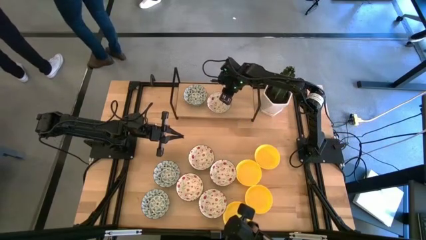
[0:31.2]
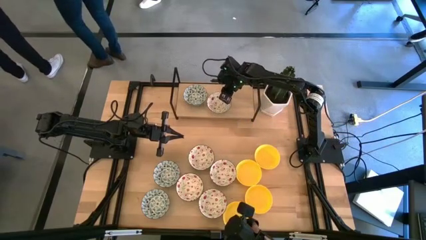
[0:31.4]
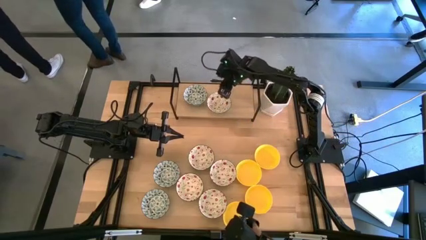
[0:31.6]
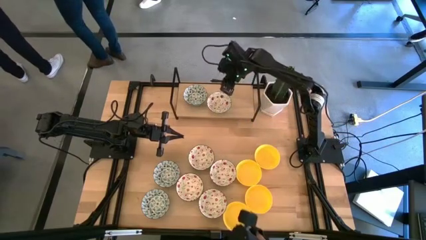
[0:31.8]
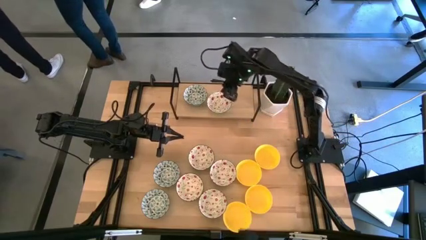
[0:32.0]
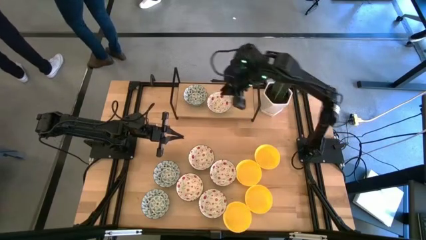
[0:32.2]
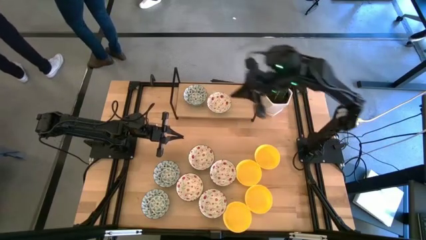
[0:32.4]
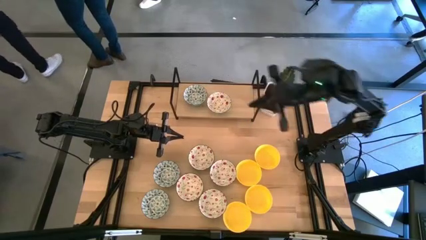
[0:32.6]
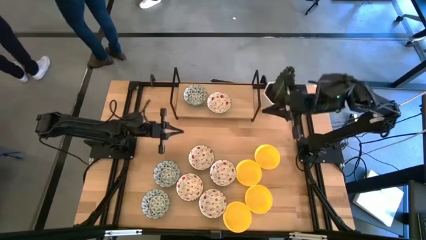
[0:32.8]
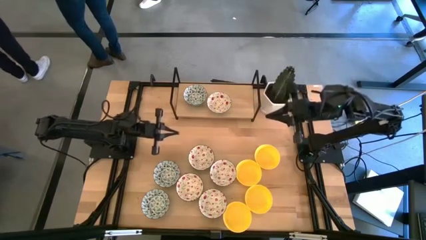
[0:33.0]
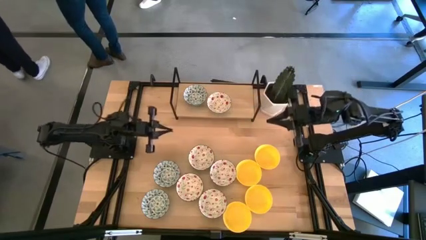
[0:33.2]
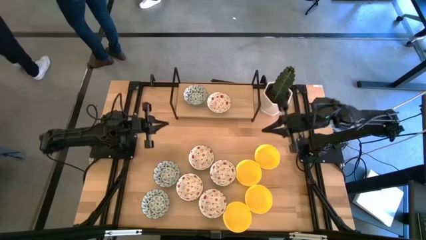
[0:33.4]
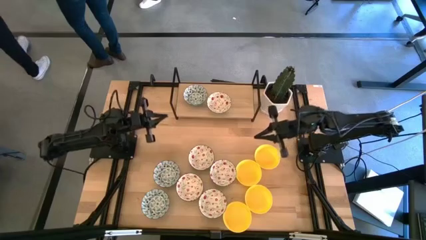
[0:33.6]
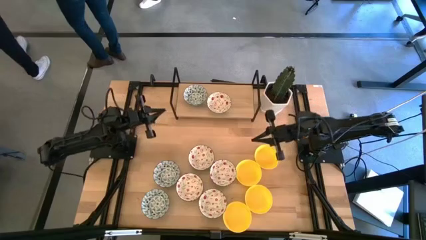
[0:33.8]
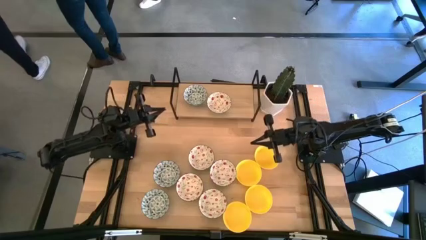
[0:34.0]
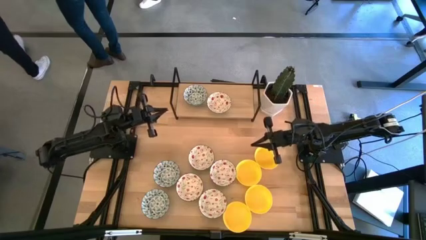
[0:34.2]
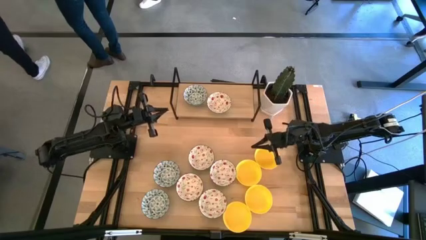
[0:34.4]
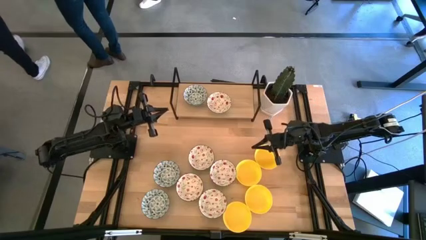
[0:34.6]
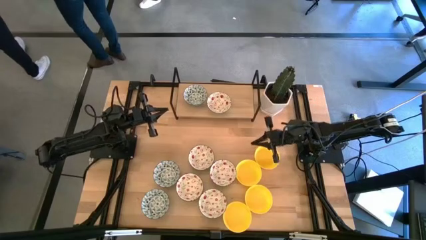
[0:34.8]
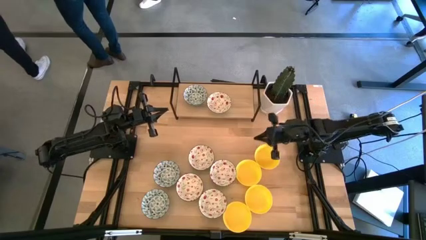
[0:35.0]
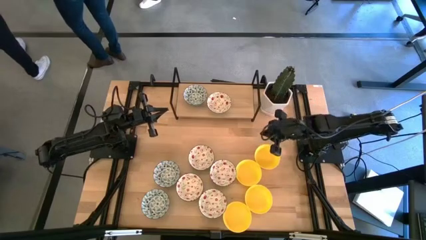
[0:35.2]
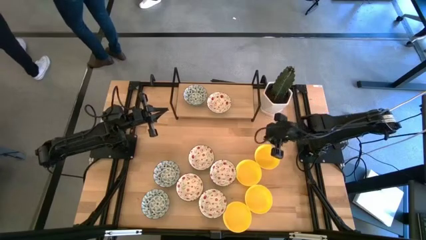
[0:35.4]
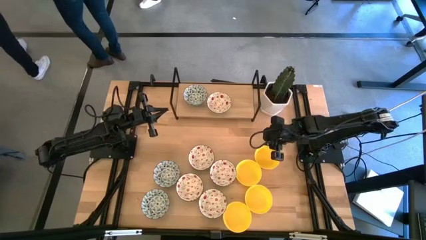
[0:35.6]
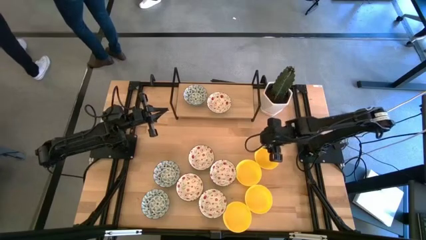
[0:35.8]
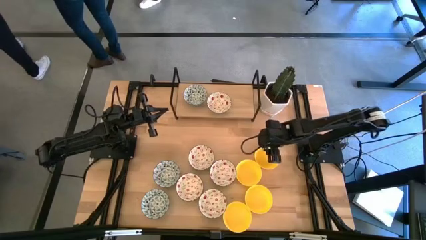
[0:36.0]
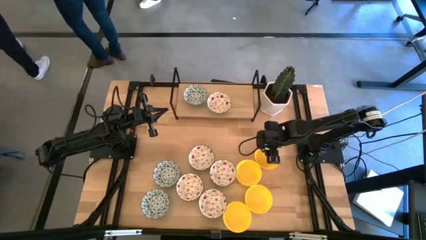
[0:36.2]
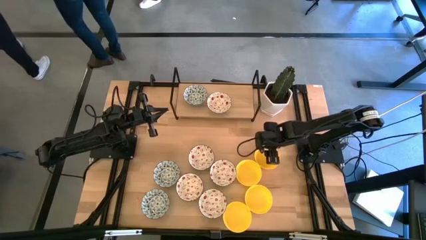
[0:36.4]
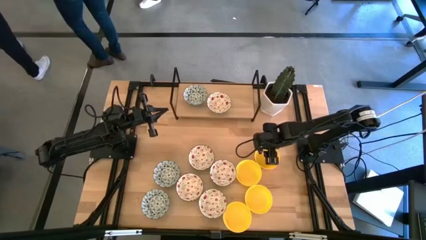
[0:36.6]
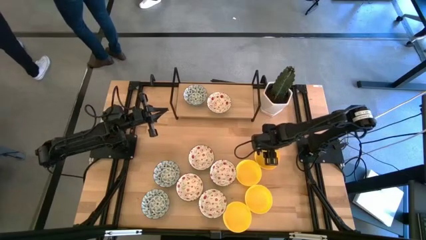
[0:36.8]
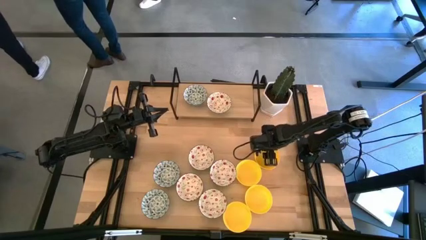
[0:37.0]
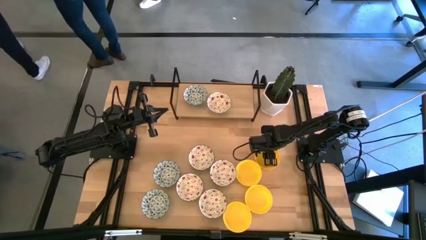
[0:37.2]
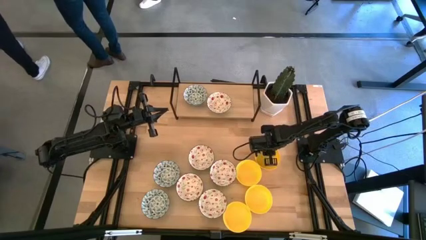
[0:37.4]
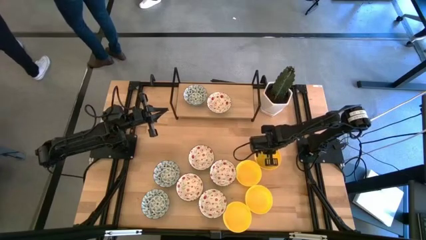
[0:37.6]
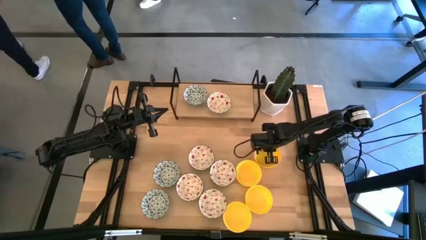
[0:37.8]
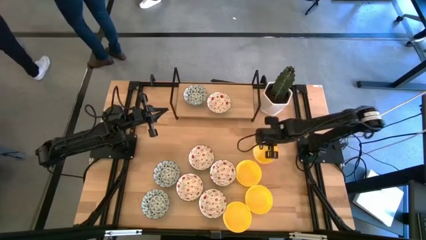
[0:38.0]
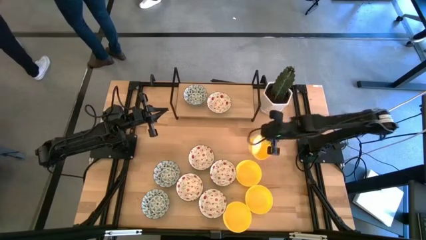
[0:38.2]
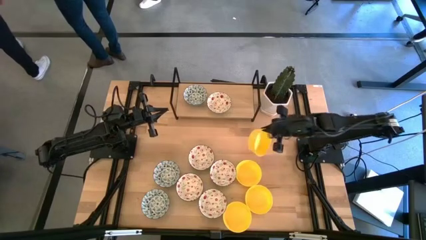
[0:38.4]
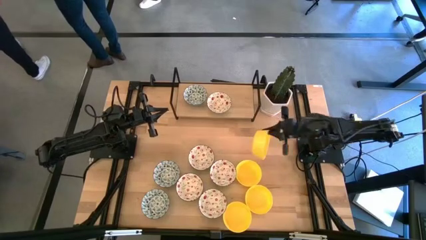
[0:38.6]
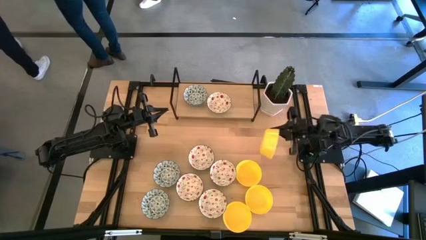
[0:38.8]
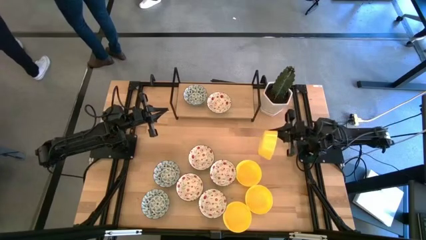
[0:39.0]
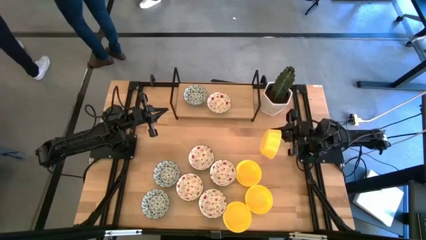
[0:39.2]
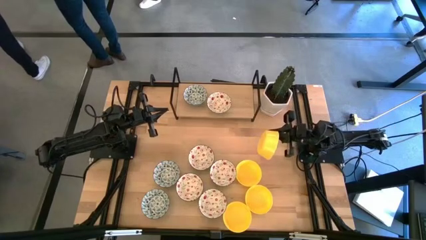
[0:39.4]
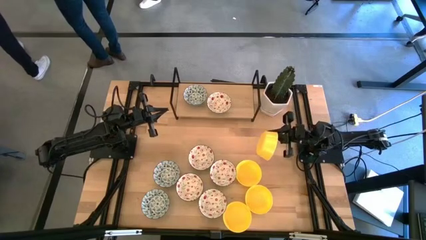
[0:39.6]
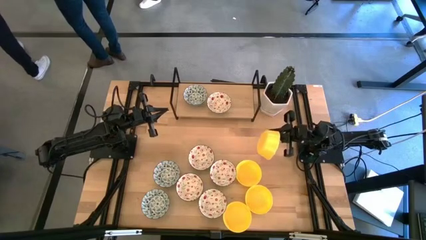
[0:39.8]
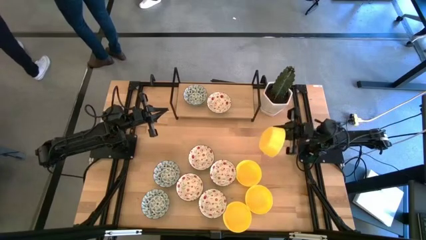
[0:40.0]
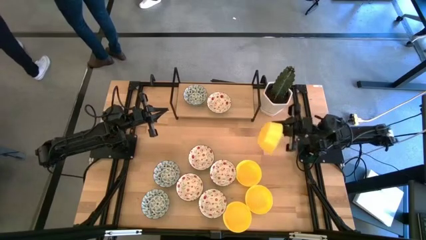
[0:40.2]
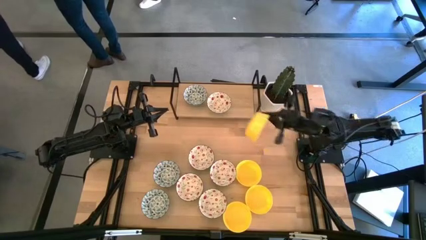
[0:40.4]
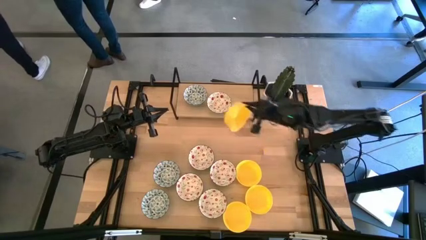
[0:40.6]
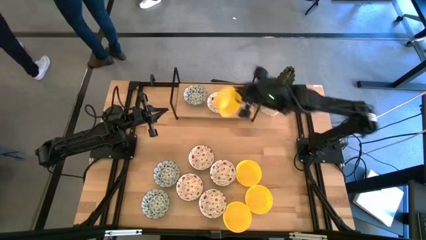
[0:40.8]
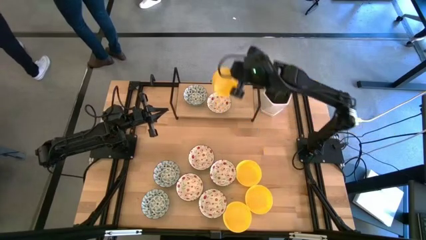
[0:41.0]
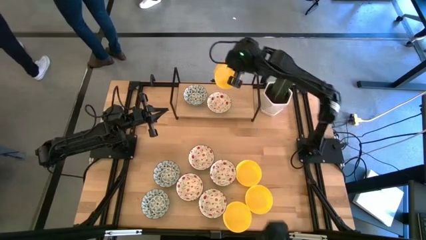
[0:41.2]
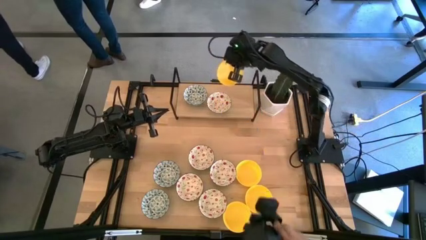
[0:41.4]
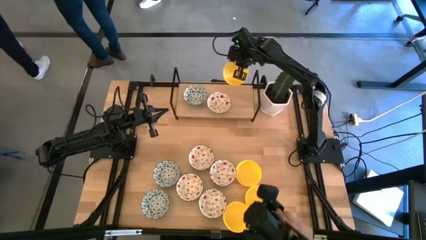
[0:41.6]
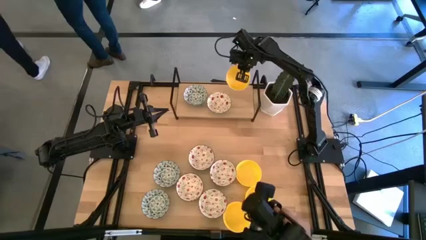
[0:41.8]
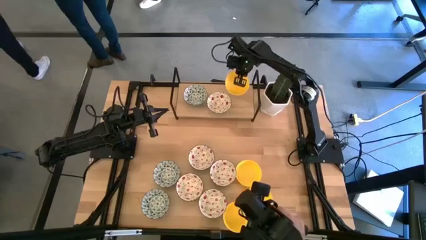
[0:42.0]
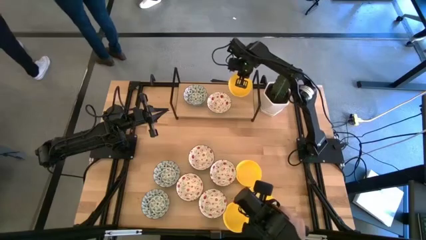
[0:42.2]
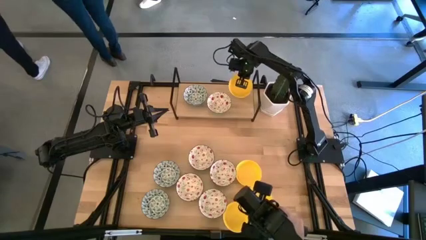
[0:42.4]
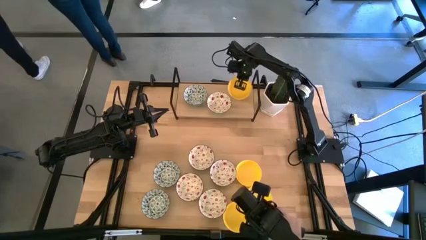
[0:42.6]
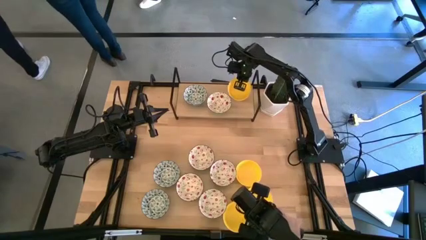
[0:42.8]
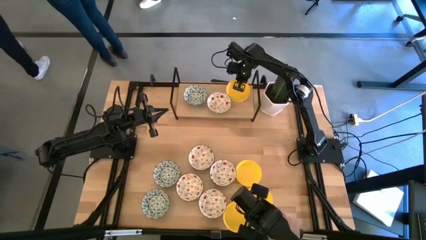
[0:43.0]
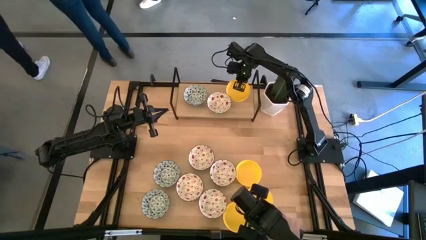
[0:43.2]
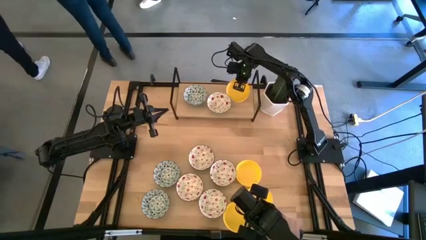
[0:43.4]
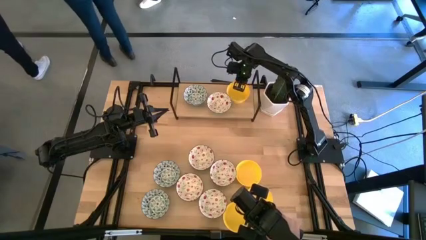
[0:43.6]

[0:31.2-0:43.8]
Task: Pick & Place Mini bowls
Put the yellow bowl on the shelf

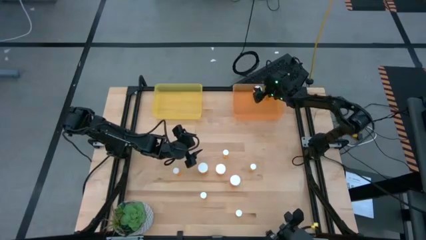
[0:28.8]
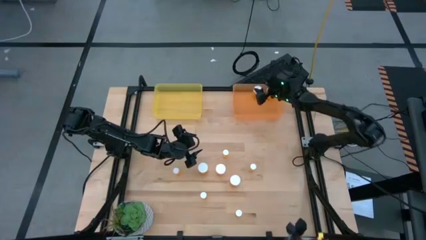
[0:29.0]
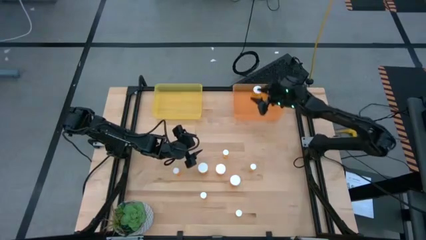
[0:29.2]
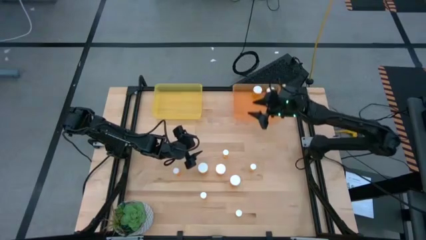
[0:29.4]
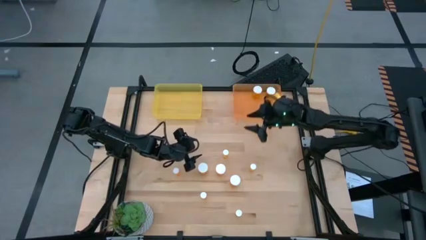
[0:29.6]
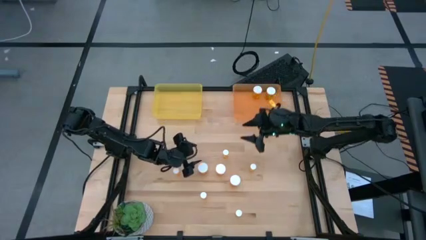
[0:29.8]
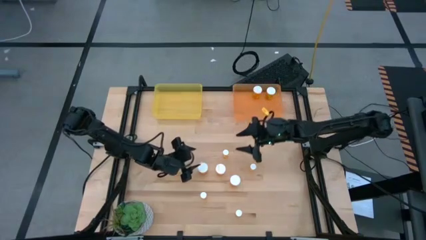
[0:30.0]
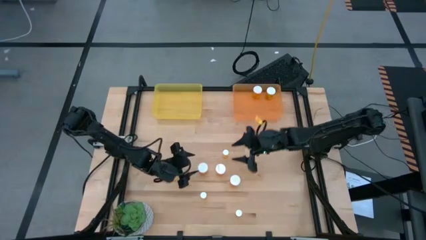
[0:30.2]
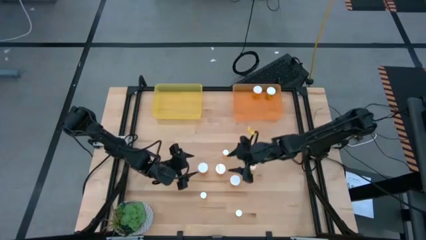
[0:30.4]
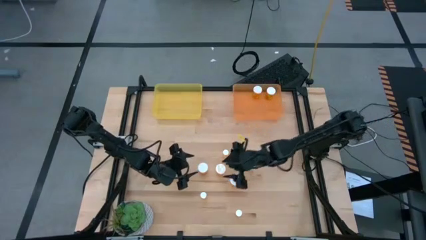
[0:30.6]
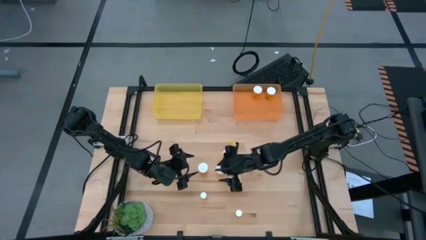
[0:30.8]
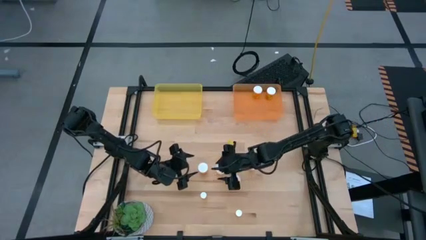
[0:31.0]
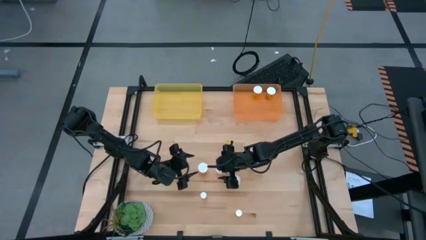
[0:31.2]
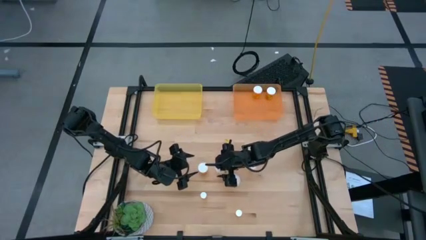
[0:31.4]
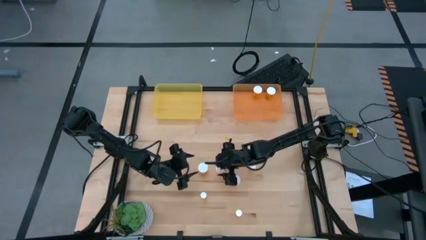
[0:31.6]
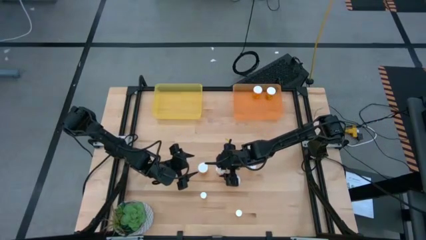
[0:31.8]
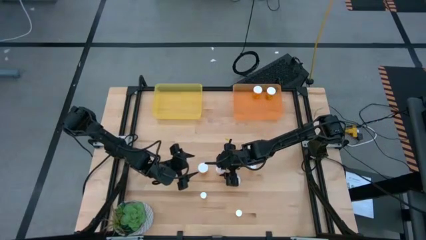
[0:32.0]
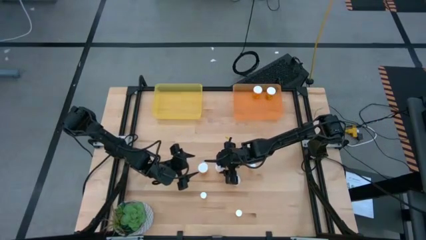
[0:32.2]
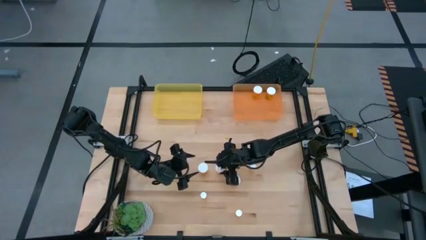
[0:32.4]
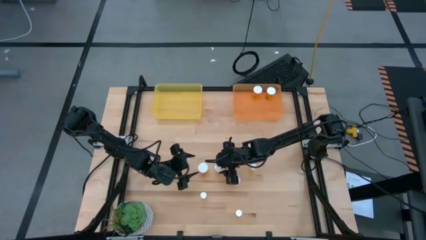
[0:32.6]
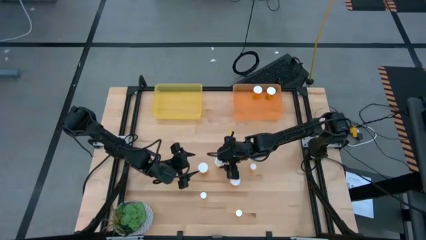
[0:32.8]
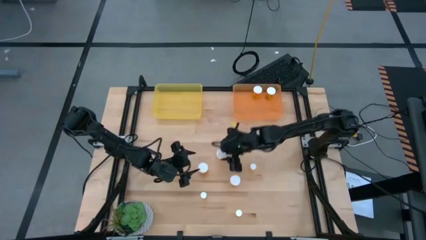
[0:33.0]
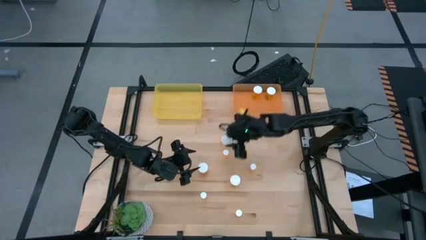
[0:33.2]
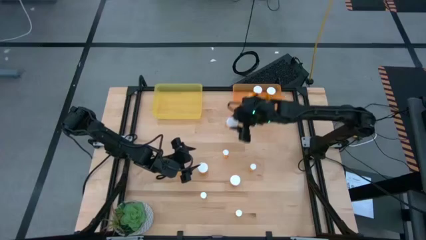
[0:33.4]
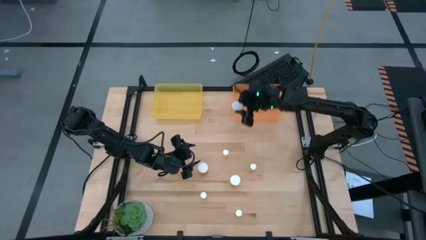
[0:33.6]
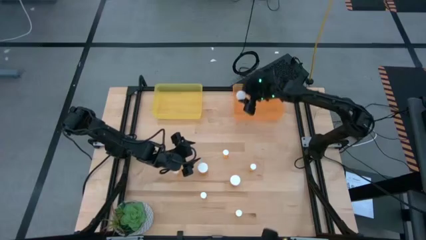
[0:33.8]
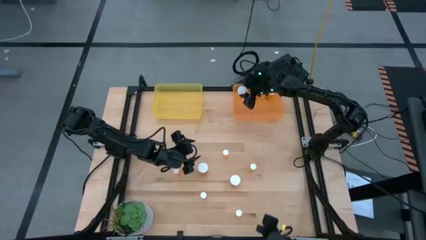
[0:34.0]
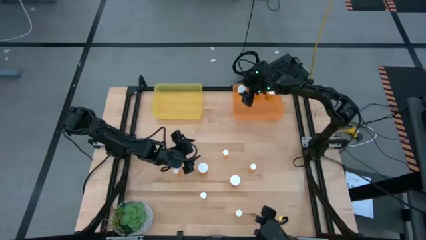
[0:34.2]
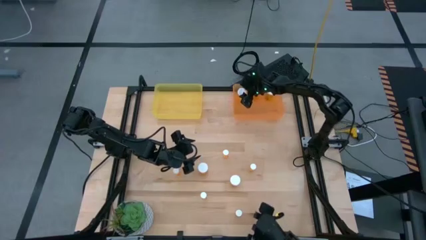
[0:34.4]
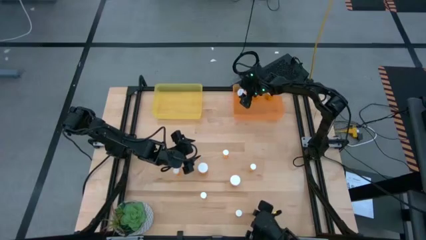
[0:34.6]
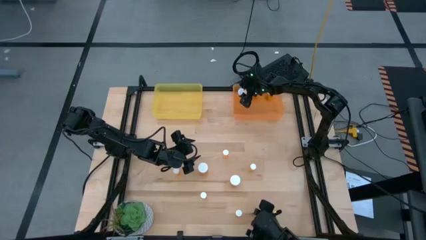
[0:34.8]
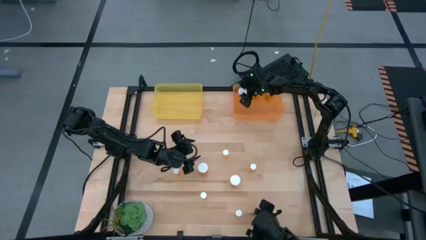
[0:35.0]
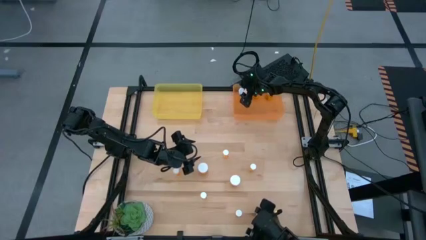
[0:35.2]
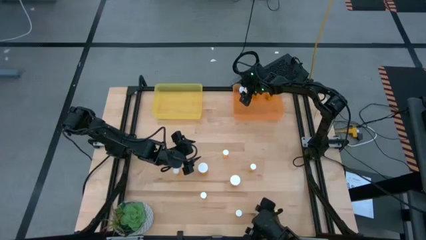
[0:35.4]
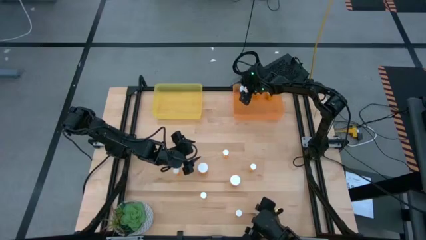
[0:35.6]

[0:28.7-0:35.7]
Task: Pick and place medicine bottles into bin by pill shape (circle, oval)
Put the big yellow pill bottle into the transparent orange bin
